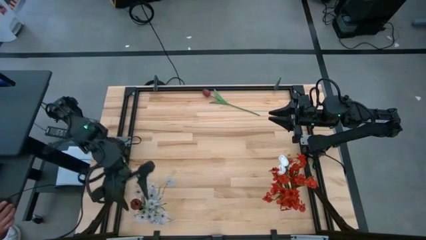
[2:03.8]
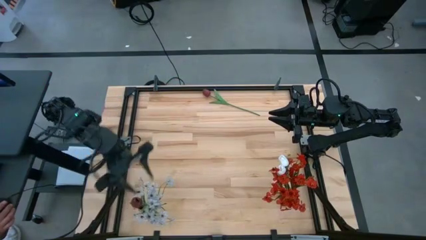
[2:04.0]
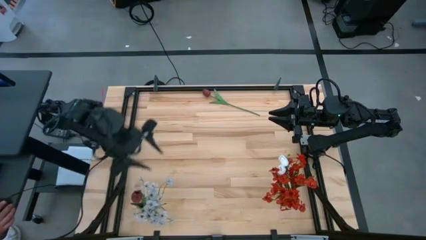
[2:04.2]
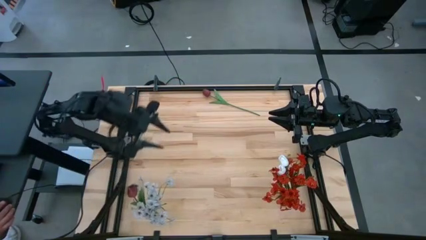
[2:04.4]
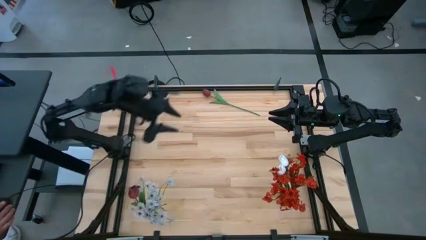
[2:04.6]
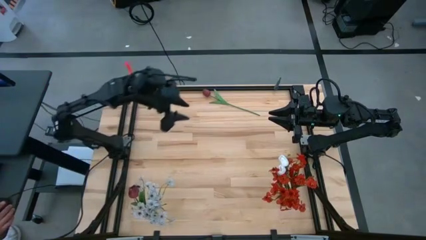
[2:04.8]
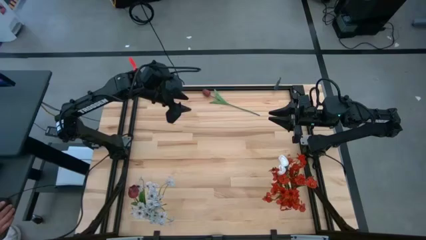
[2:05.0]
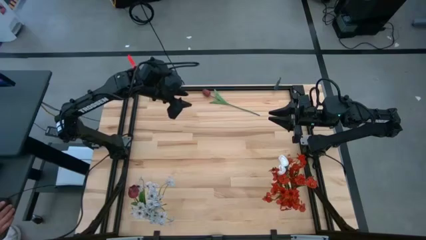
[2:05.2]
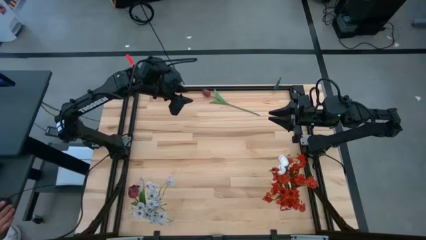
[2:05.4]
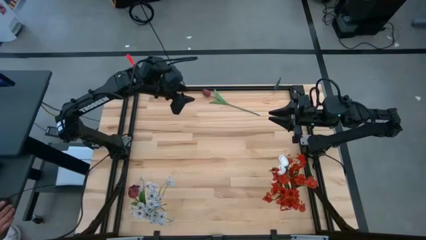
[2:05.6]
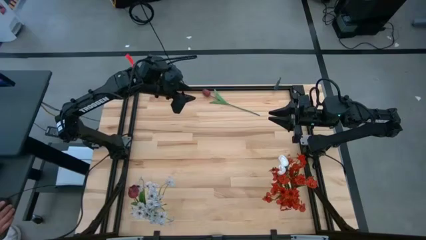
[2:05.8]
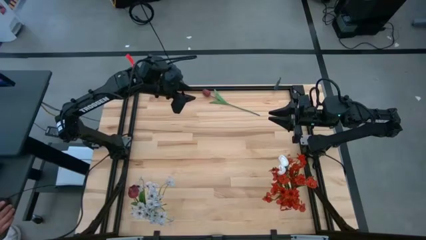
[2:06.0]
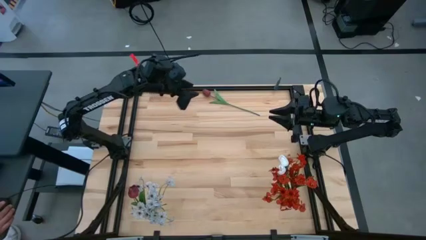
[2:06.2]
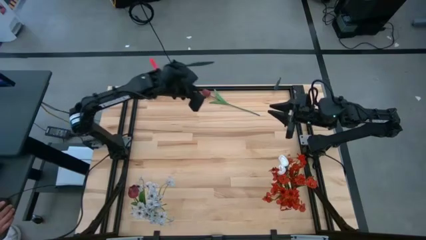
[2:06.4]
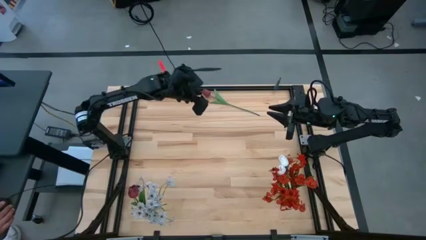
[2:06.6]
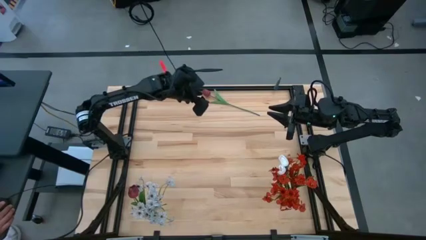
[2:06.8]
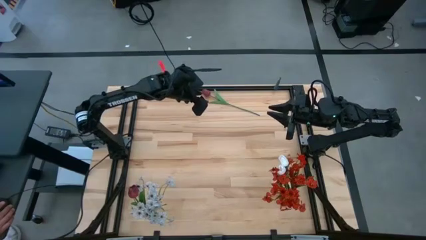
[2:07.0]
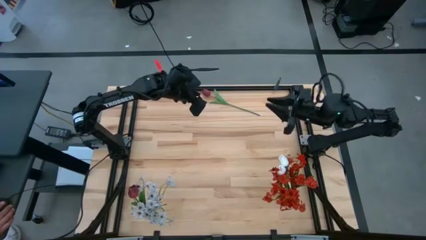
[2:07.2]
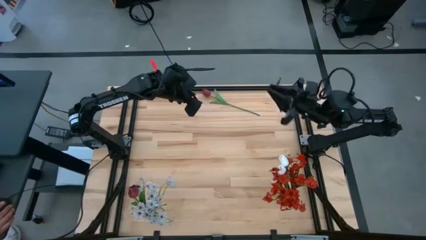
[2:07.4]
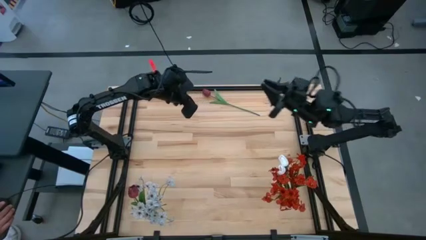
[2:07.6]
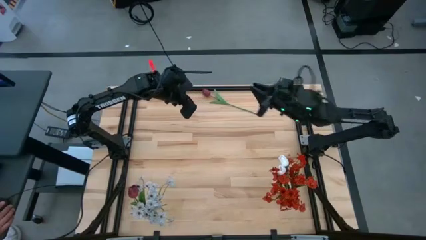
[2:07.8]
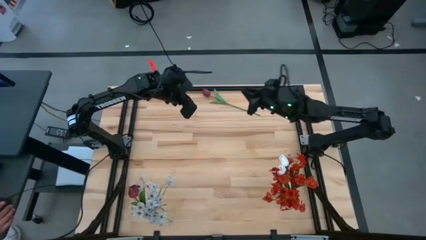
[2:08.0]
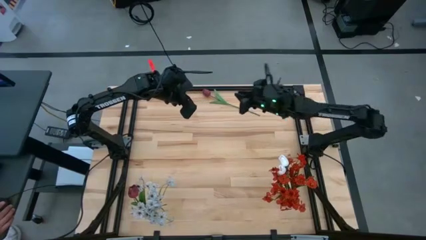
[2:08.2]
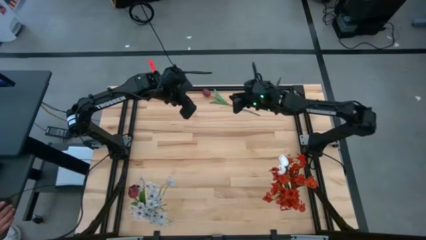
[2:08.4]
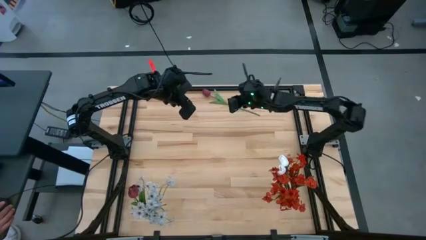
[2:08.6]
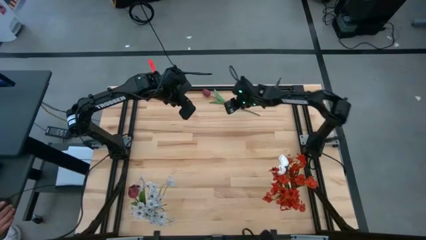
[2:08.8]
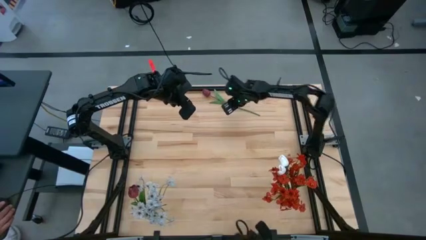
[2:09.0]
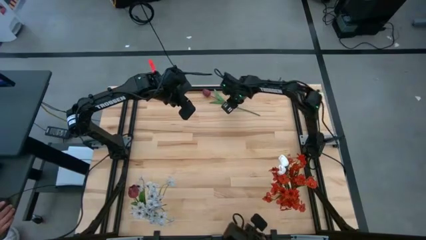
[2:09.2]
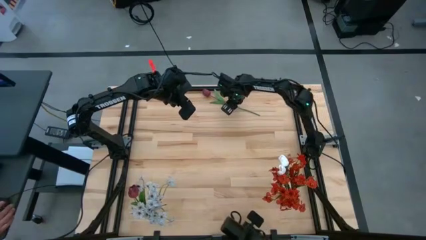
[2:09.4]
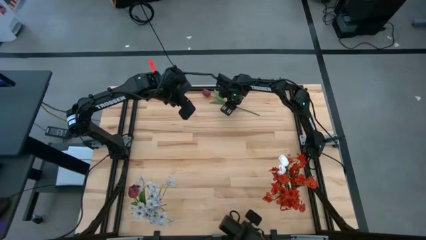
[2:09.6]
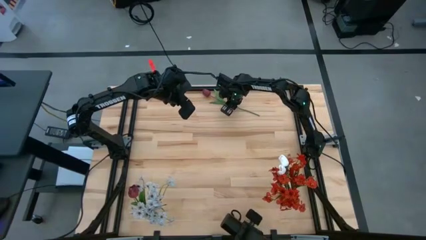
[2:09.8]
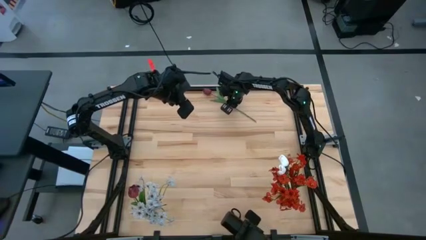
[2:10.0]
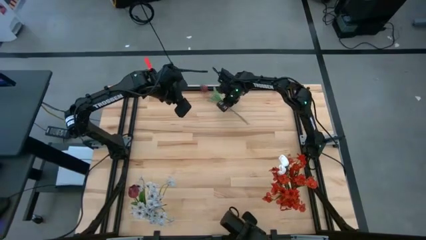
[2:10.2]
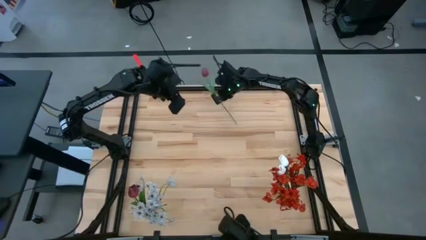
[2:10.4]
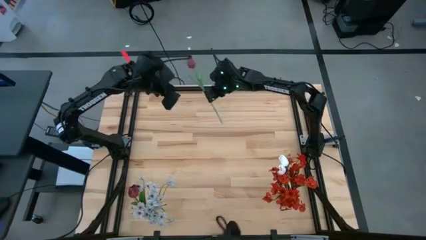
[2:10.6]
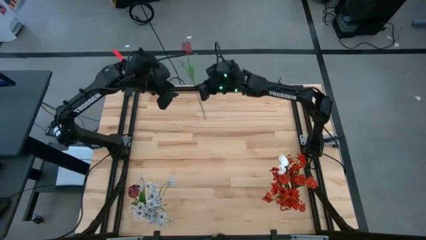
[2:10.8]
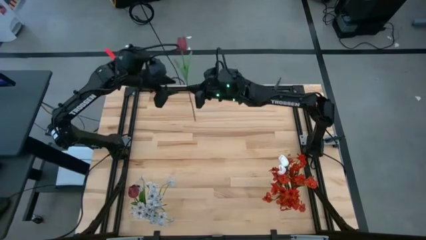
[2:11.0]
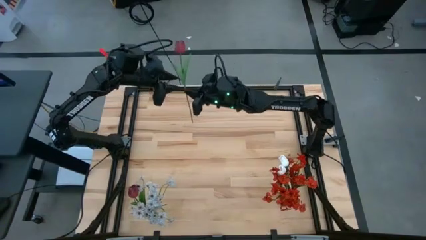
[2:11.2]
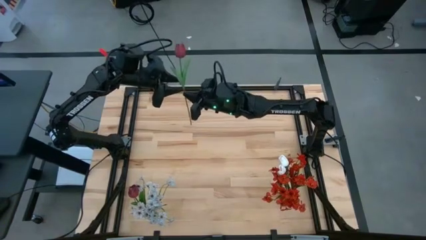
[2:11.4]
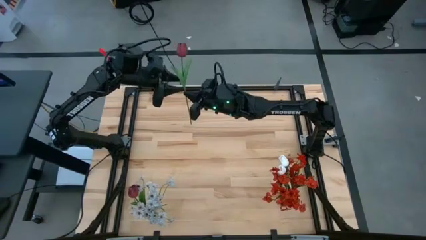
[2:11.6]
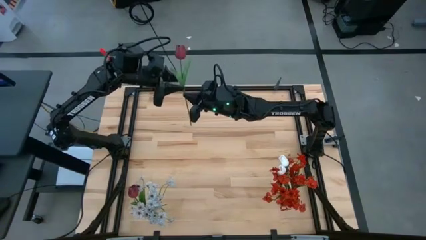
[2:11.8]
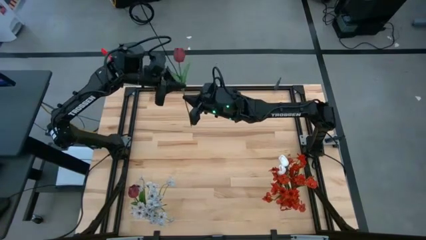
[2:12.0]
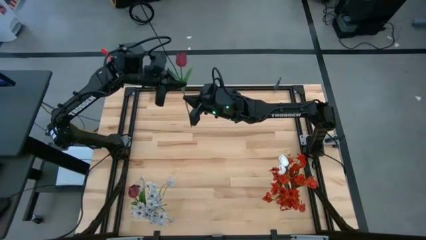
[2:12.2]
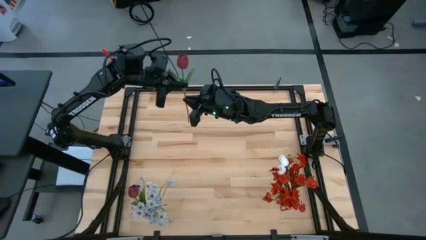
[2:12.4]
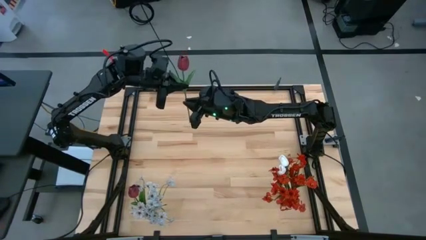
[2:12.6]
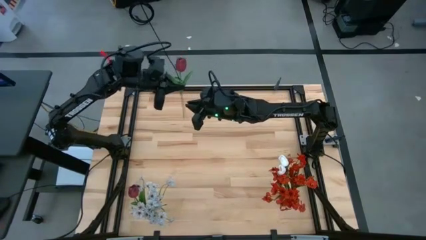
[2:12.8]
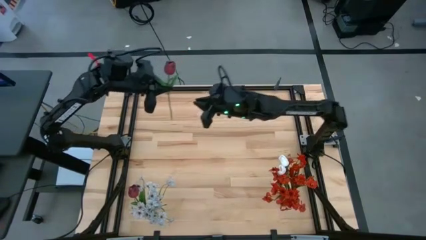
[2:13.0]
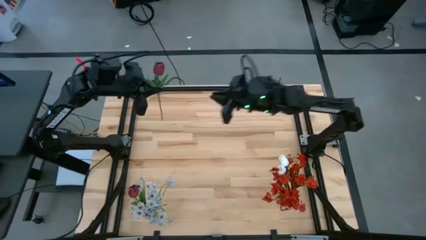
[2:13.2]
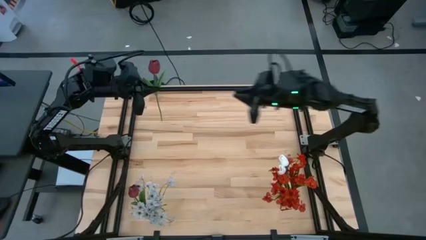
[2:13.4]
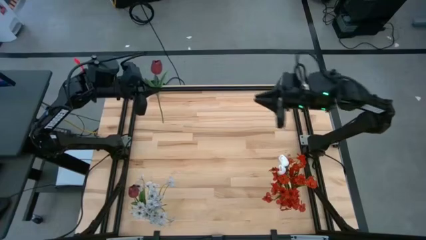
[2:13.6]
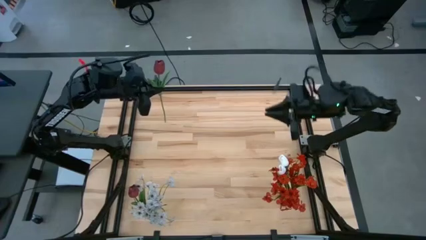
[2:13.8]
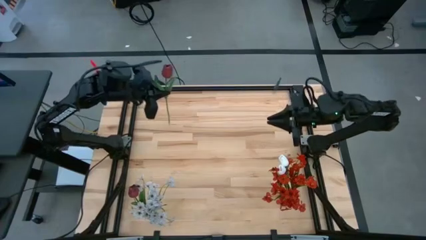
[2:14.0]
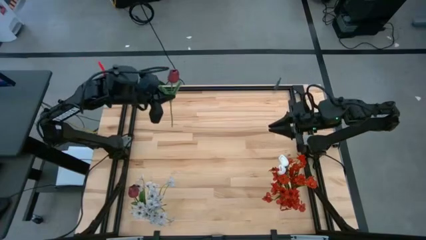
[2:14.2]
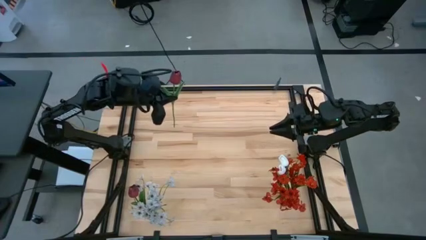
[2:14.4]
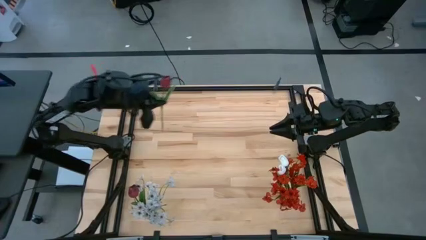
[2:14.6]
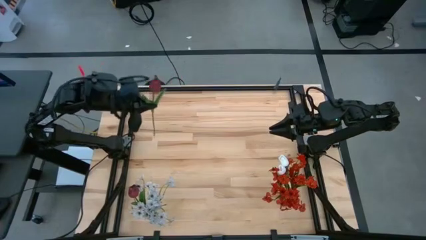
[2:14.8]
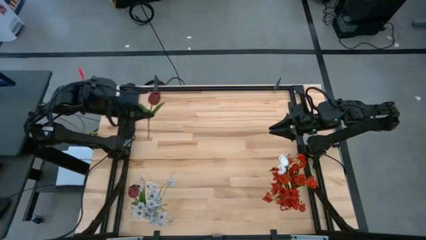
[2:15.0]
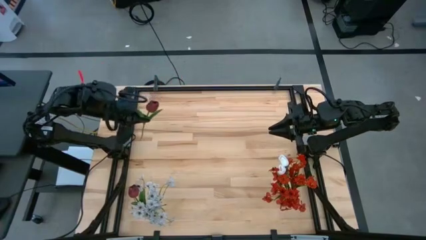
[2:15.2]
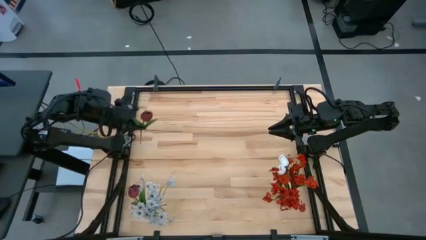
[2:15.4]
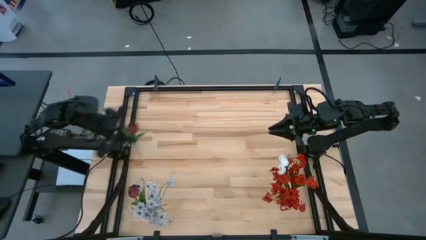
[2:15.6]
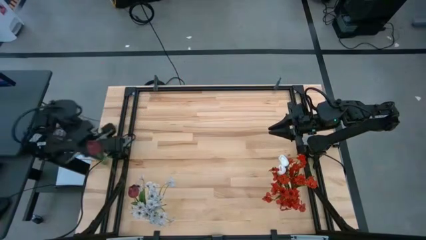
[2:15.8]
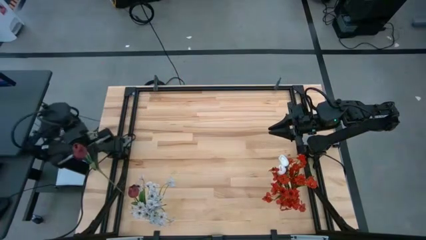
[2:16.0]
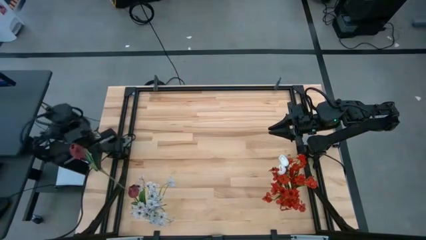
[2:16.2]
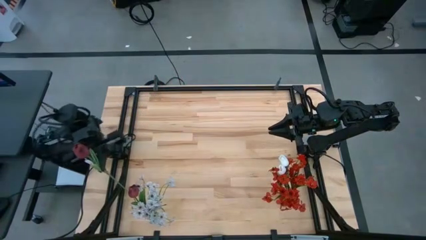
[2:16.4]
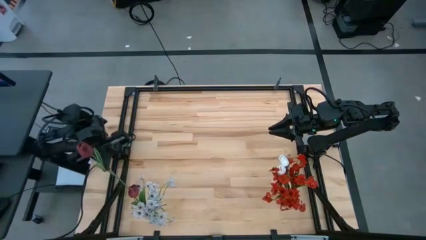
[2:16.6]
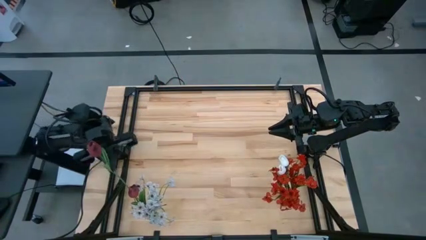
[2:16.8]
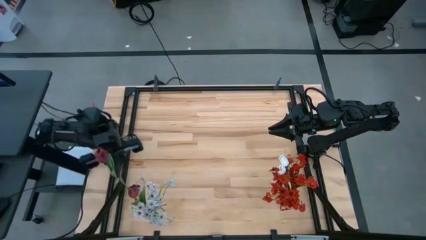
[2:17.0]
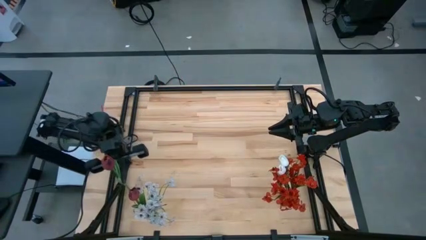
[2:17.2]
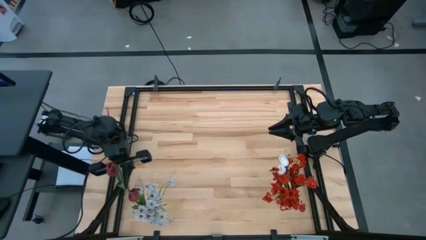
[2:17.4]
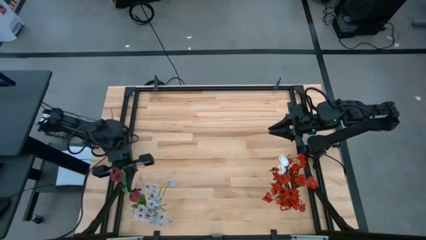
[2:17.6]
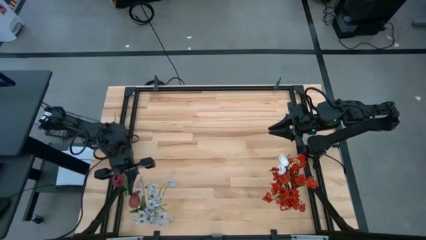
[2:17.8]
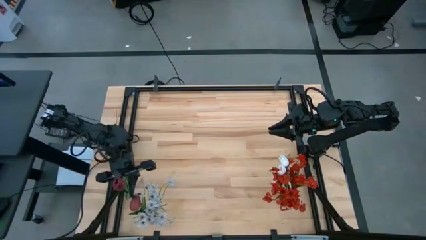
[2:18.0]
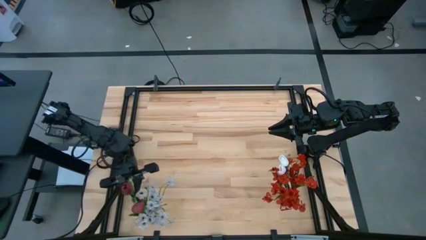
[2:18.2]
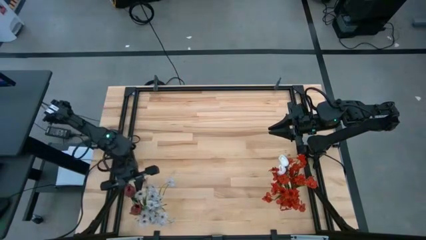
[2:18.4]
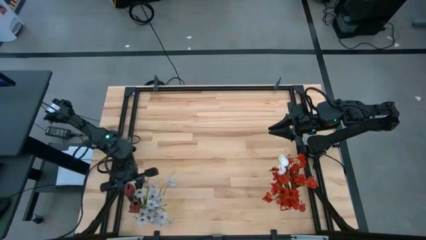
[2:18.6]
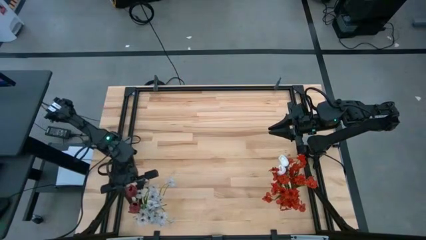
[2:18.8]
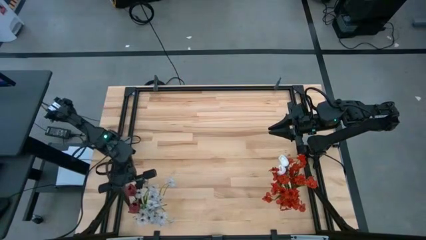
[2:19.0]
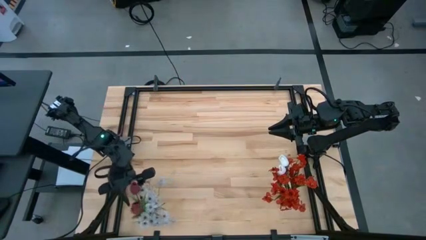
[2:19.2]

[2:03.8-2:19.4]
Task: Sort flowers into vase by color
Put the red flower into the transparent vase

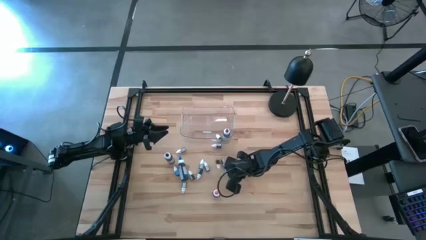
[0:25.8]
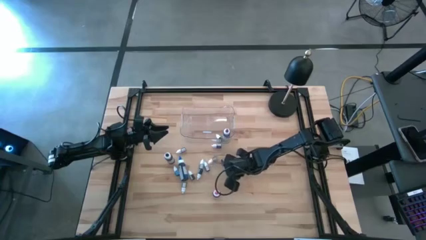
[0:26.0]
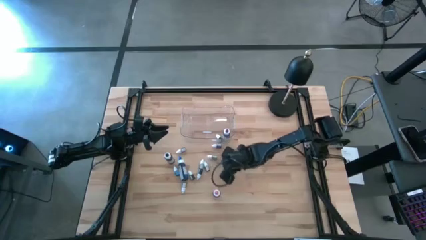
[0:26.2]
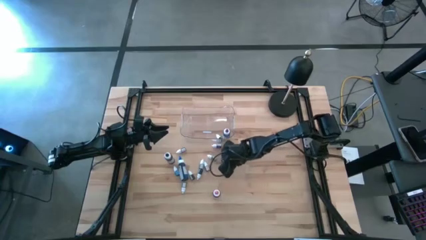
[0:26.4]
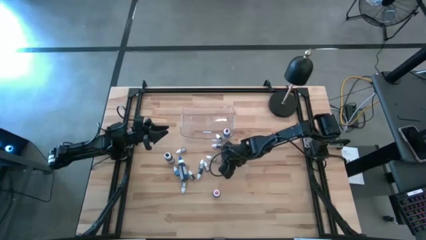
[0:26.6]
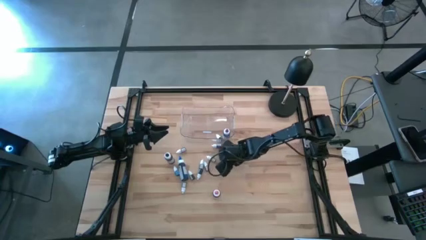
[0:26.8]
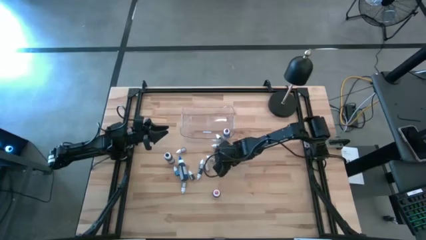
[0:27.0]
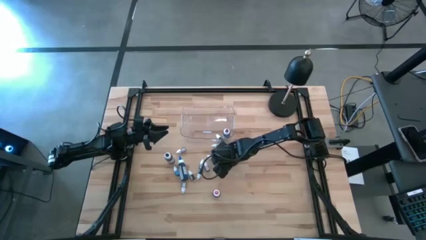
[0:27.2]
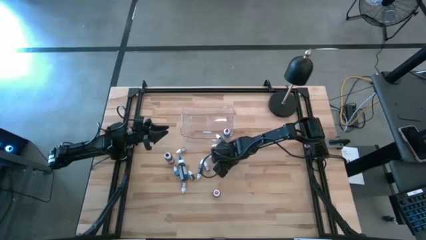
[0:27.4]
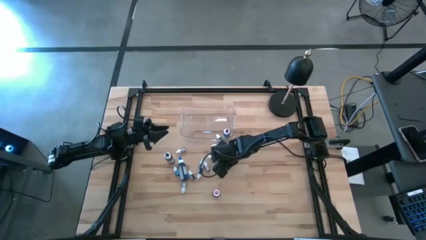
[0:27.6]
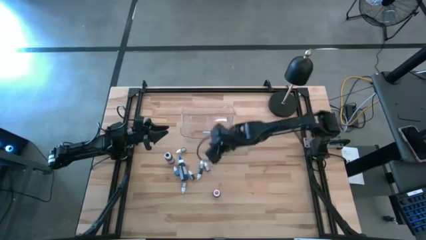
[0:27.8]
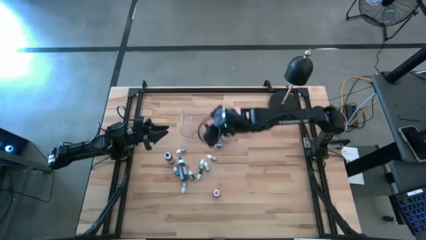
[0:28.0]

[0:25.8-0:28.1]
Task: Pick & Place food coloring
Put the small red food coloring bottle into the transparent bin
